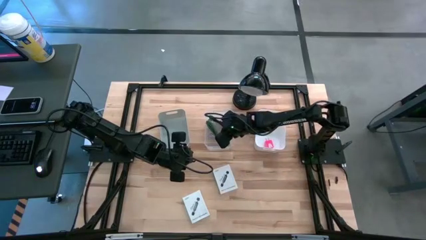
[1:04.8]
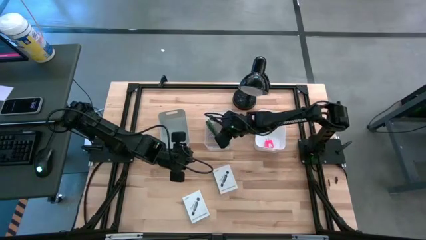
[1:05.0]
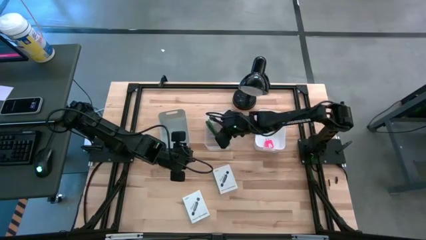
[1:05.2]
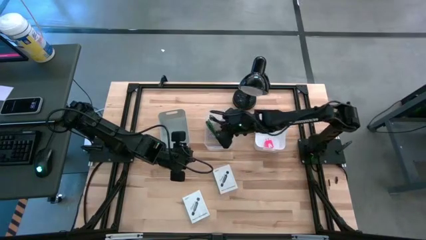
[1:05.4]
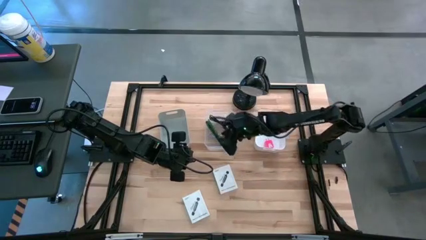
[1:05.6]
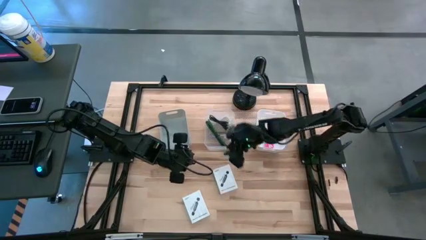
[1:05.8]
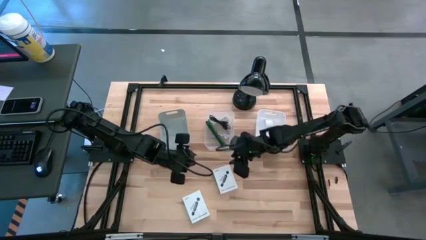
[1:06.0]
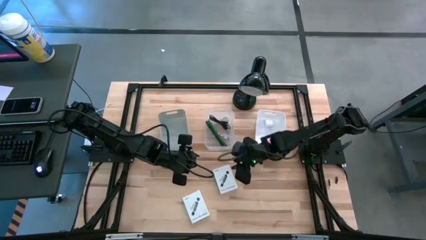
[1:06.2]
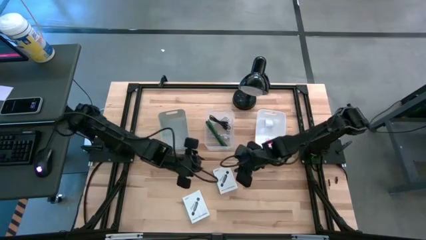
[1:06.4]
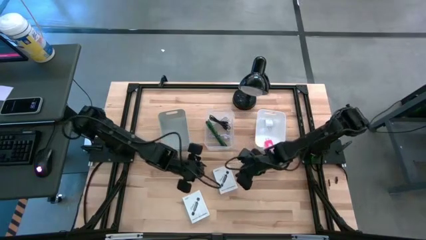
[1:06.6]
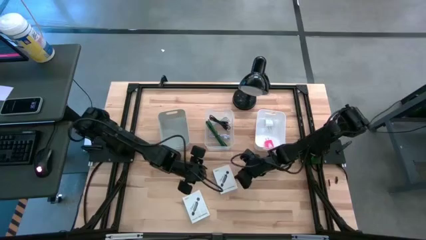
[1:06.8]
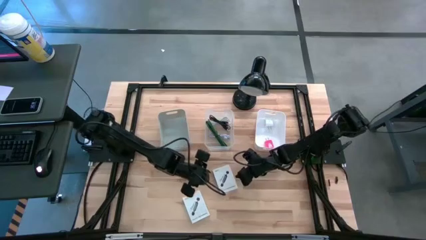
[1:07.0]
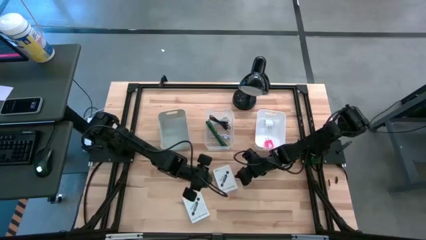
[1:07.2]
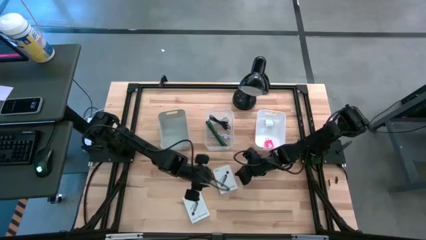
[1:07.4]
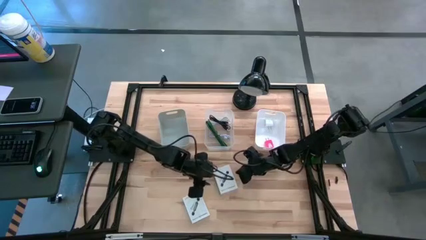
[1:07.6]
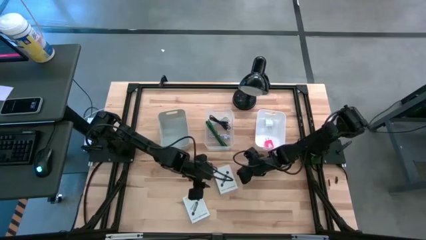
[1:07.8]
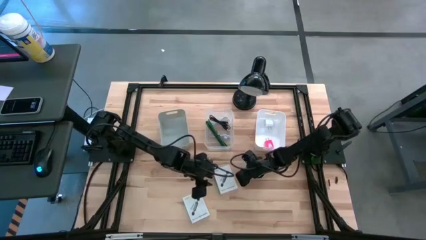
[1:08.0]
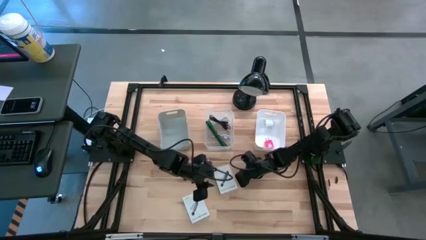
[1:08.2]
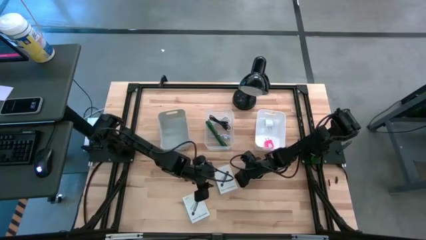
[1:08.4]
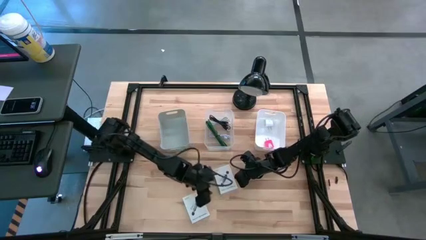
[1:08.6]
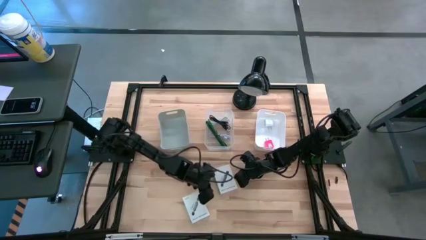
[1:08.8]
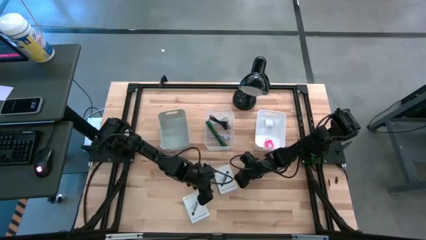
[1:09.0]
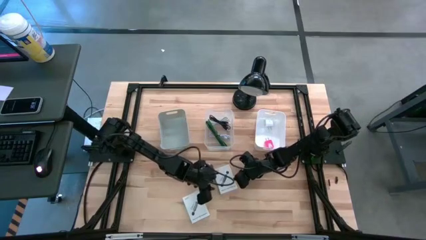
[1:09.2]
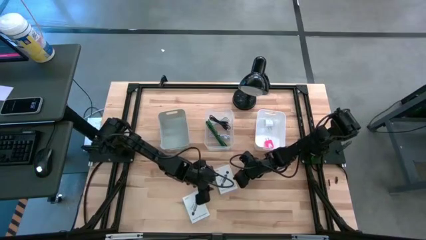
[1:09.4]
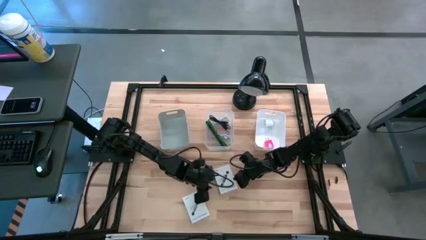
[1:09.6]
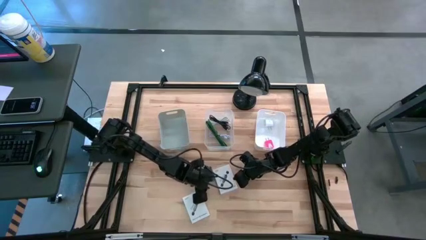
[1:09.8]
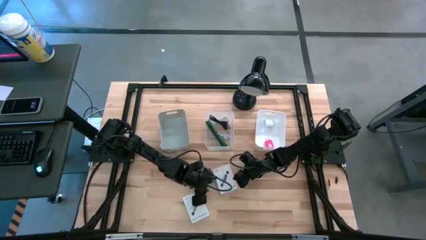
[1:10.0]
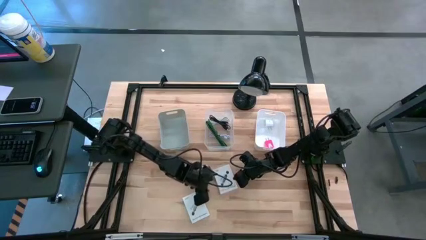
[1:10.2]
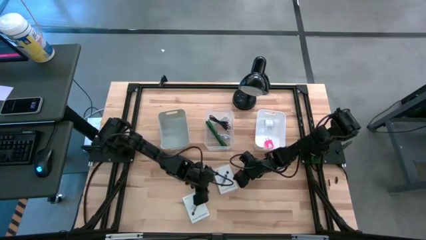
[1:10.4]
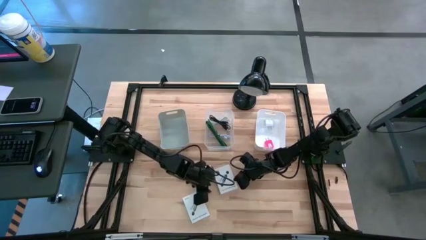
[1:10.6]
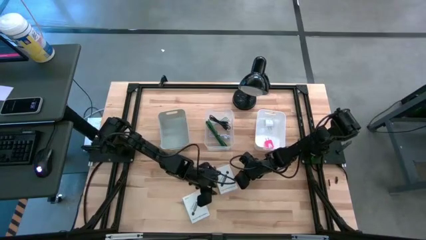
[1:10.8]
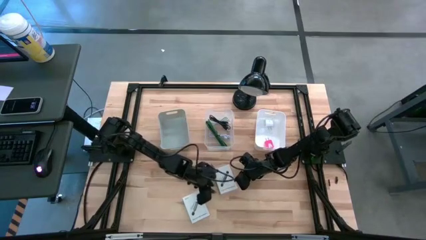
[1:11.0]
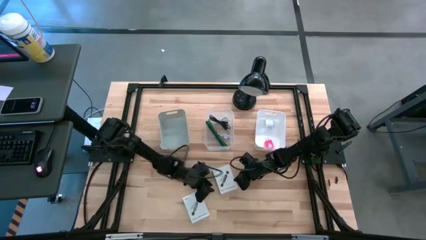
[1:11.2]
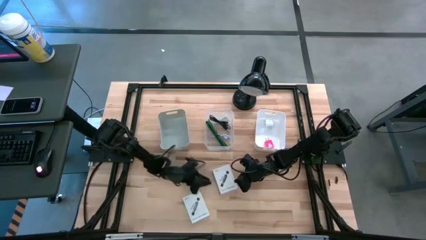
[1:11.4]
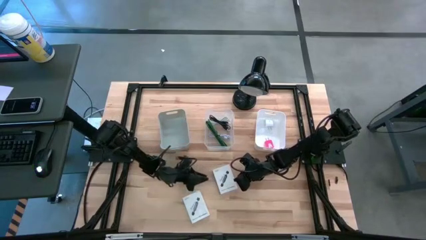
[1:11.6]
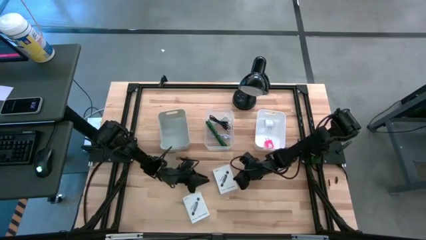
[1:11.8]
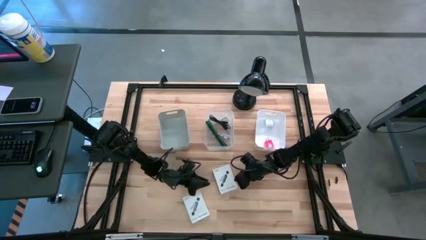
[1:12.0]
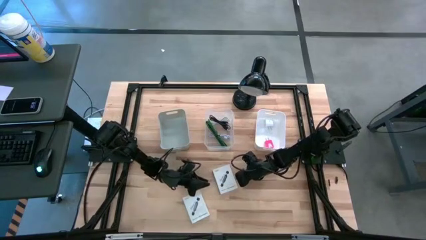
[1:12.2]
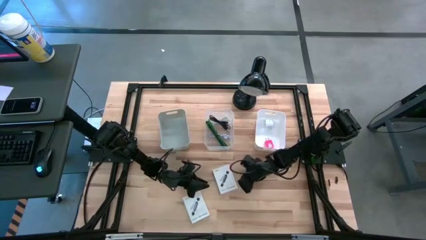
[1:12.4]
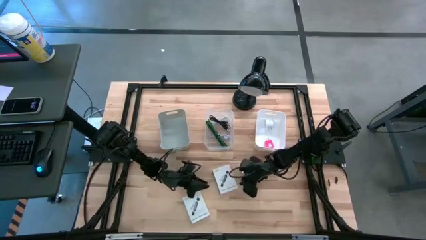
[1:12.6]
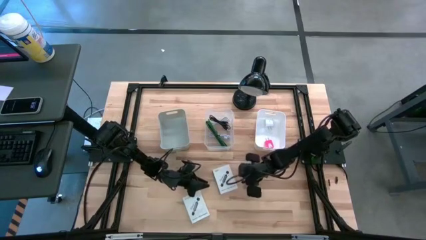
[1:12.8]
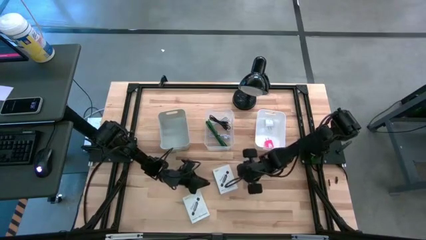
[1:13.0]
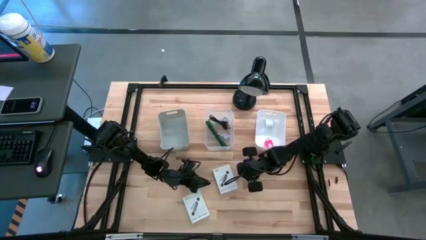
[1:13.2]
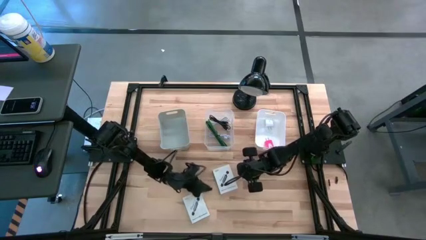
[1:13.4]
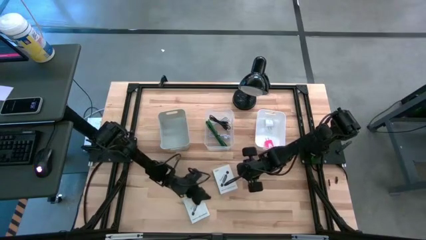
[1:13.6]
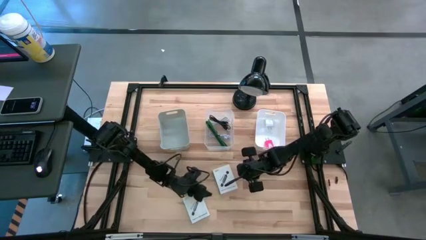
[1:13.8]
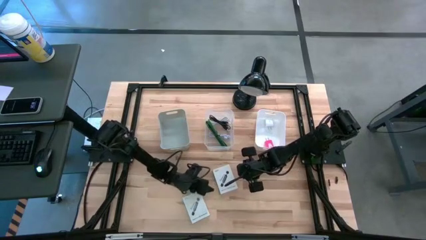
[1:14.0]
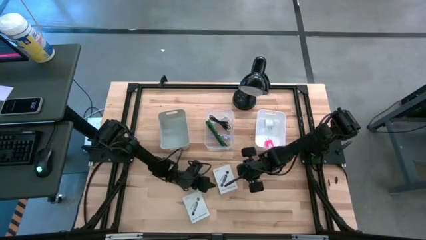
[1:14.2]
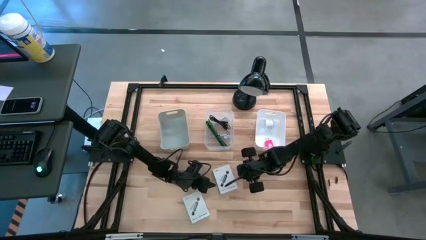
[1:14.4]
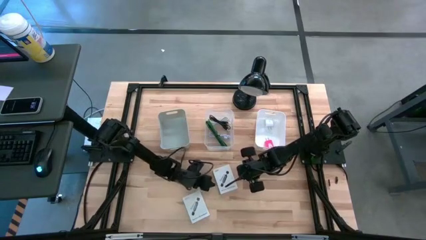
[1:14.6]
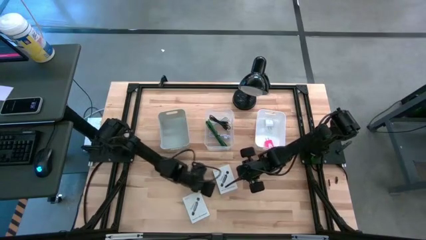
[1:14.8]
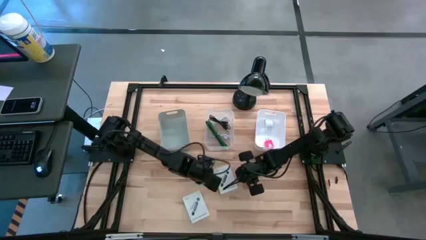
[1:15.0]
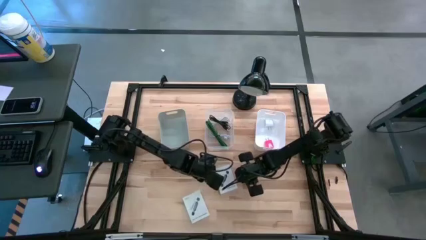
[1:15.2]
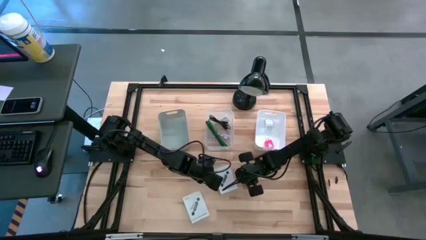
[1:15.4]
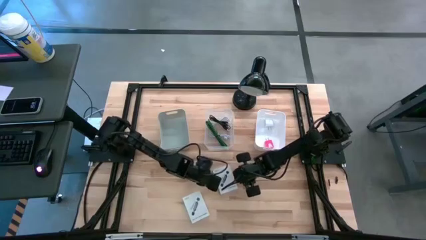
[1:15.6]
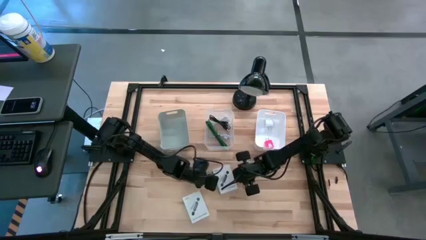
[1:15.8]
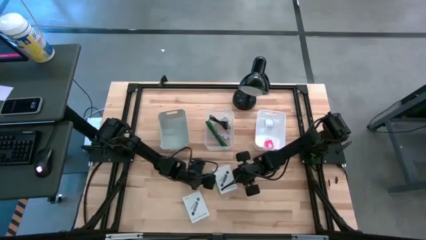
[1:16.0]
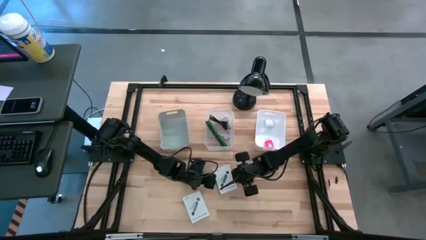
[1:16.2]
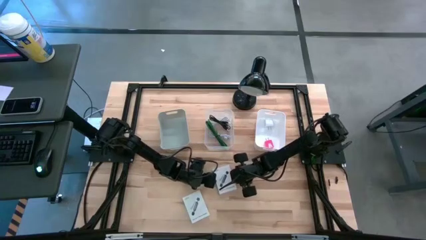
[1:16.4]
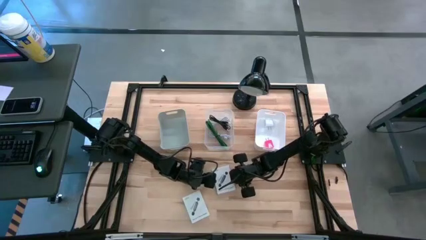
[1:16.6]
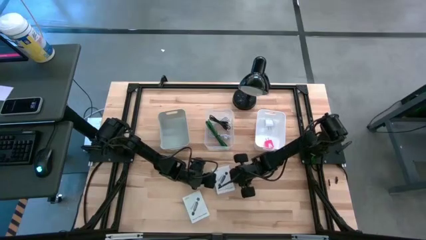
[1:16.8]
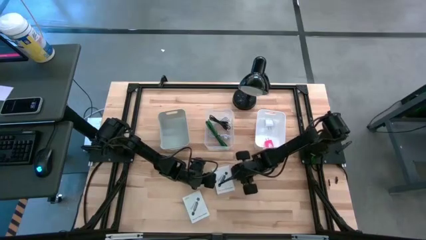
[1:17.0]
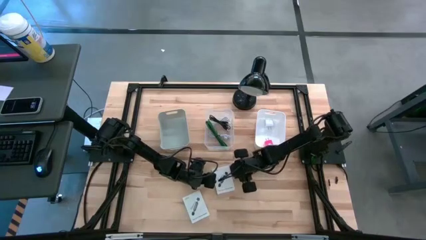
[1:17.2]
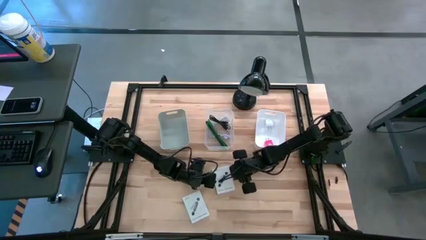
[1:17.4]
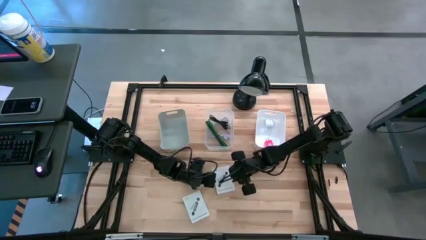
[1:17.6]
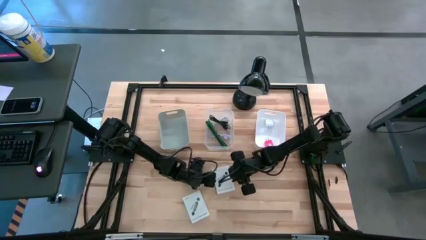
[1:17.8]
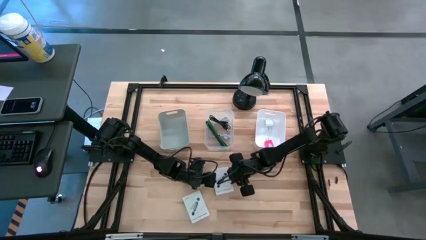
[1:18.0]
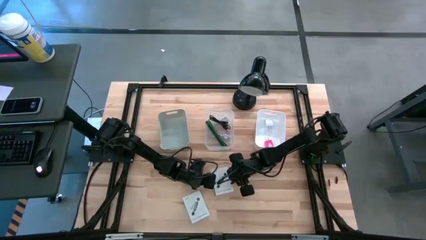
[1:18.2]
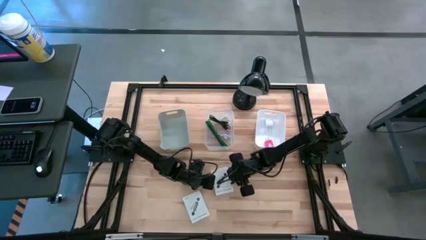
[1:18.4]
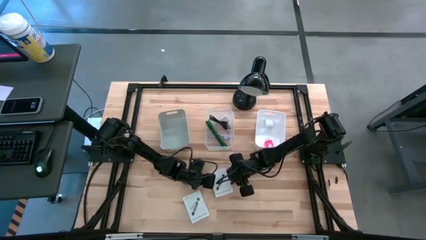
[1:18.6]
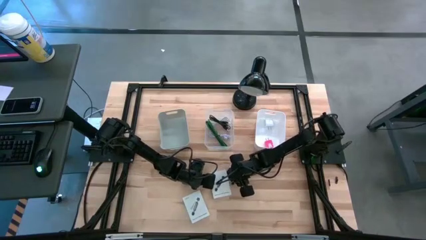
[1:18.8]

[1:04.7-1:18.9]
Task: Pick and place items into bin
Put the top white card reader box into the gray bin

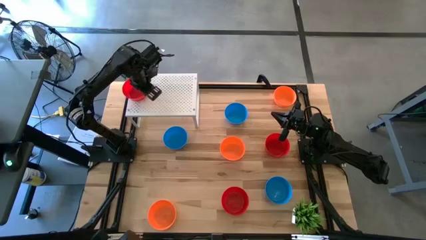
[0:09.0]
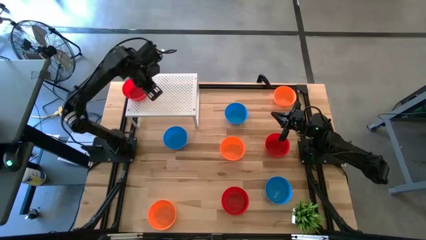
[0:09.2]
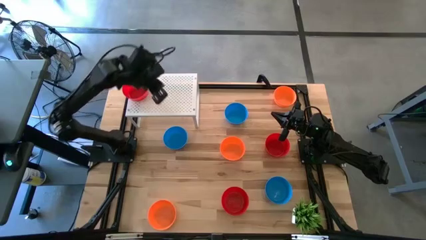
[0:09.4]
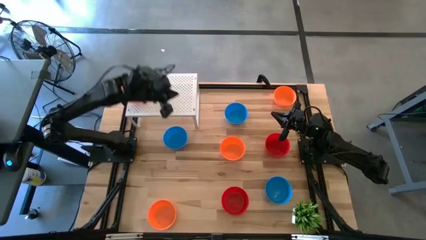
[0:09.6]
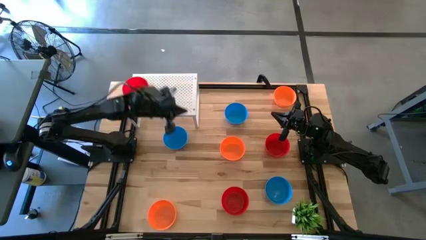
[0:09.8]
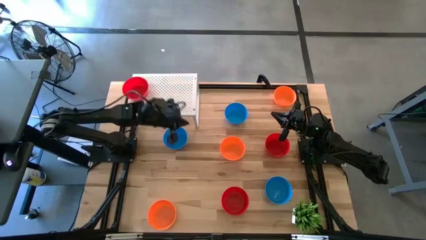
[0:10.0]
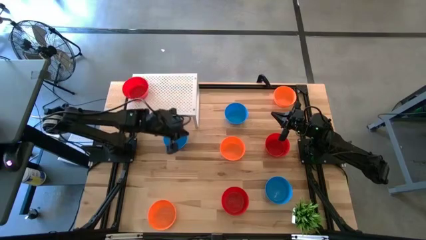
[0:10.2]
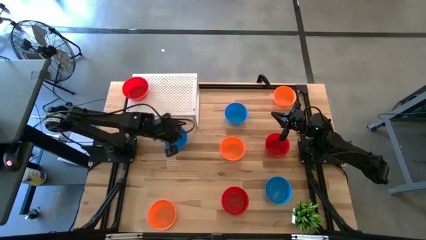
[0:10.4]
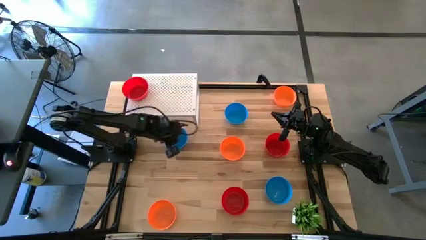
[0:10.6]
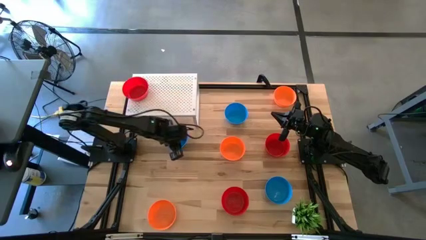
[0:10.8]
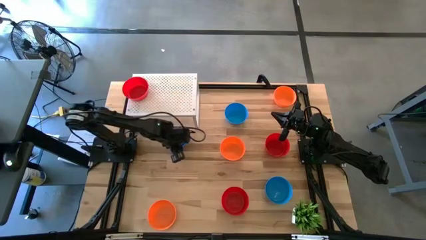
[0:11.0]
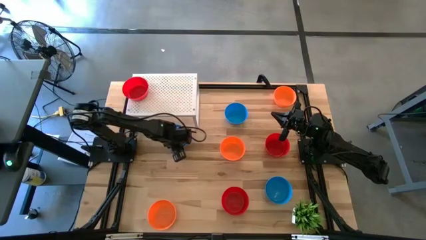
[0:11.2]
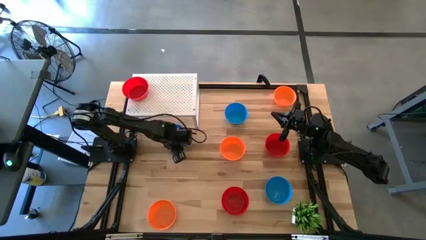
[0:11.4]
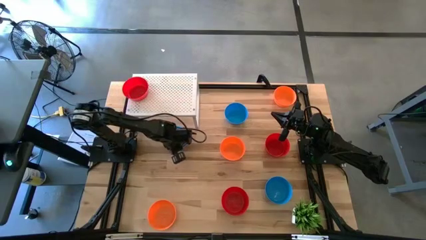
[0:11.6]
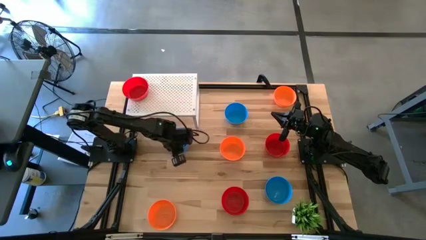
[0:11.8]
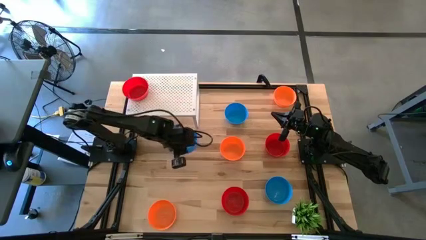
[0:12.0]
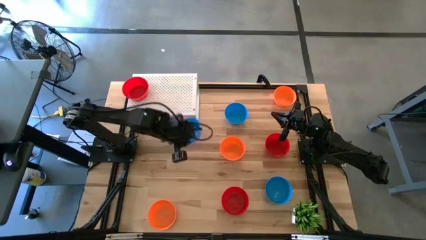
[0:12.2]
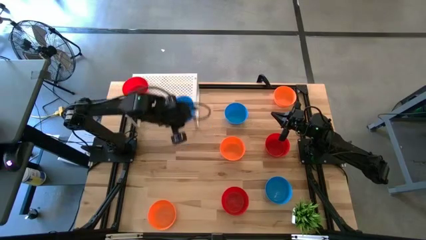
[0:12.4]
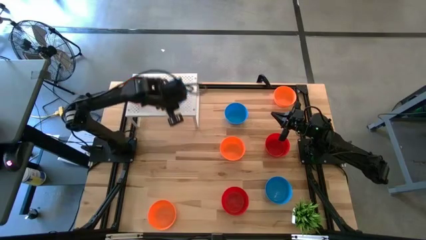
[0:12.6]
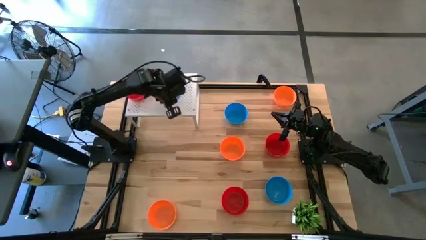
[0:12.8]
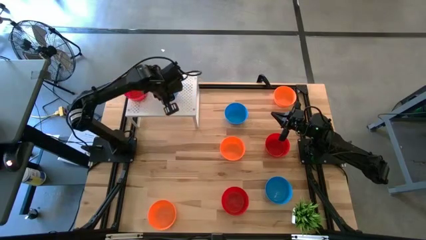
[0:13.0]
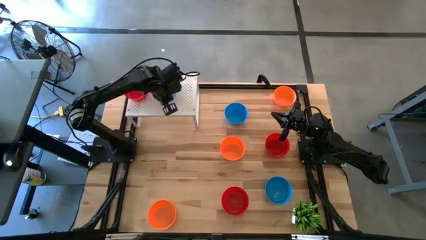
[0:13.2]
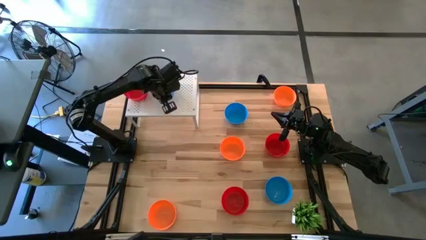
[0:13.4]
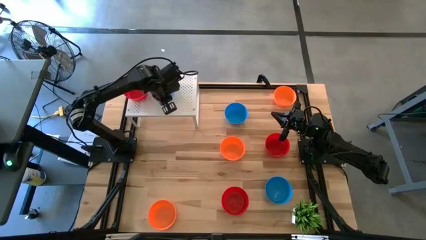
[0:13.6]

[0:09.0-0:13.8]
Task: Pick & Place Mini bowls
Put the left blue bowl on the shelf
